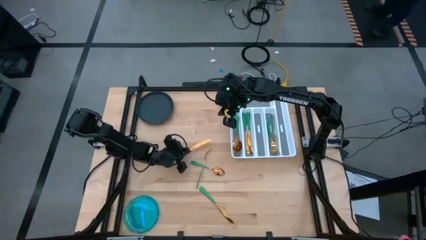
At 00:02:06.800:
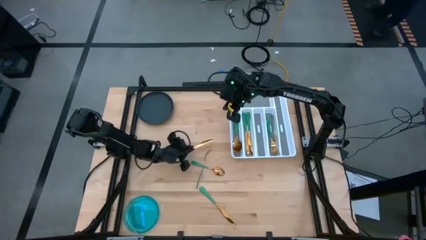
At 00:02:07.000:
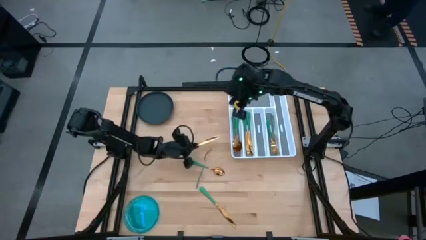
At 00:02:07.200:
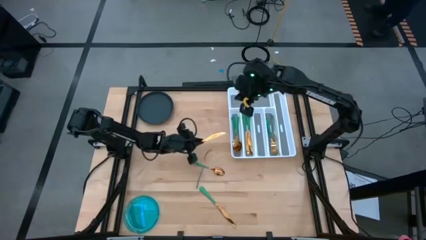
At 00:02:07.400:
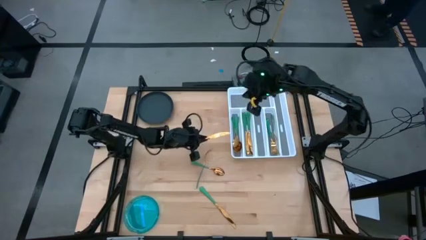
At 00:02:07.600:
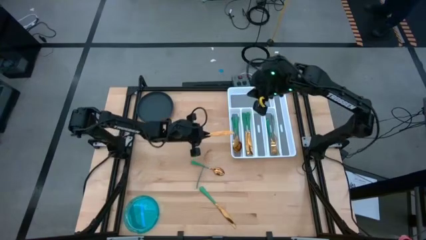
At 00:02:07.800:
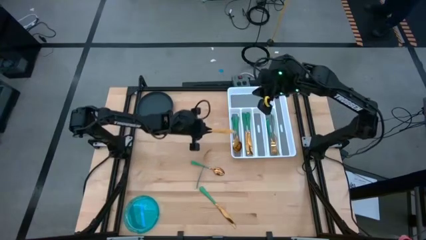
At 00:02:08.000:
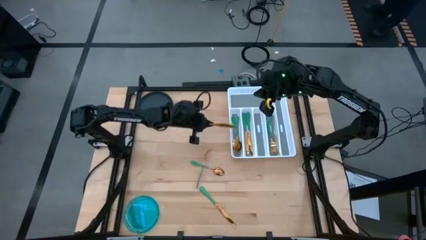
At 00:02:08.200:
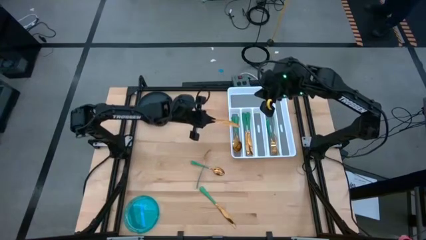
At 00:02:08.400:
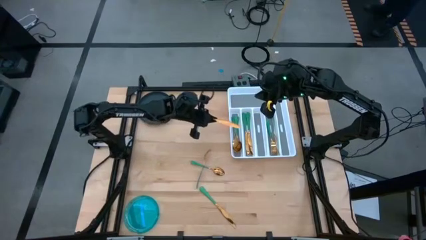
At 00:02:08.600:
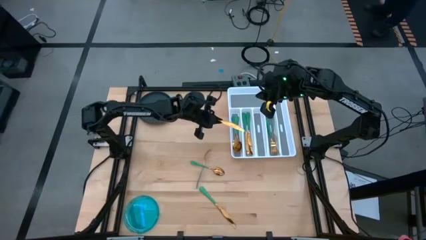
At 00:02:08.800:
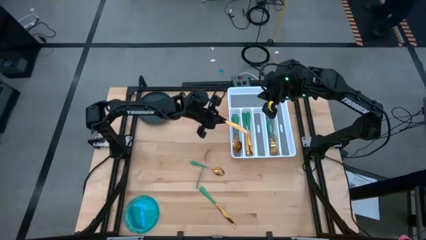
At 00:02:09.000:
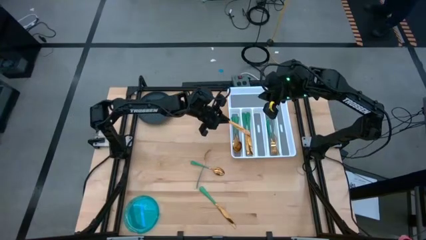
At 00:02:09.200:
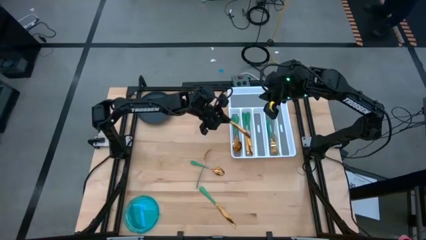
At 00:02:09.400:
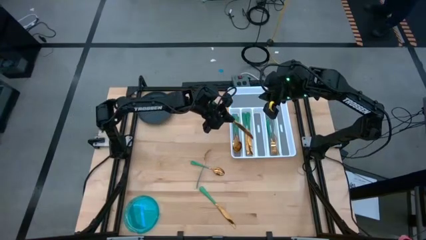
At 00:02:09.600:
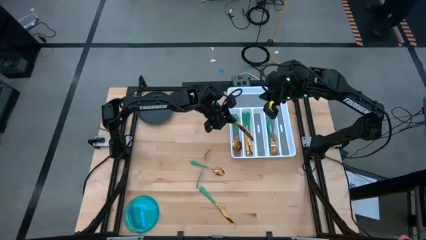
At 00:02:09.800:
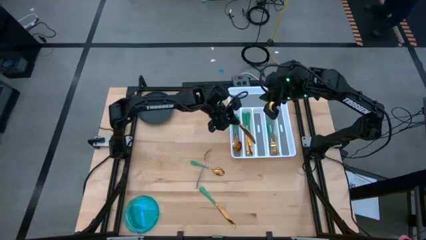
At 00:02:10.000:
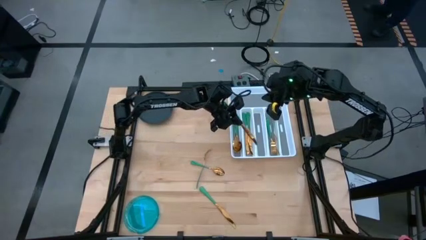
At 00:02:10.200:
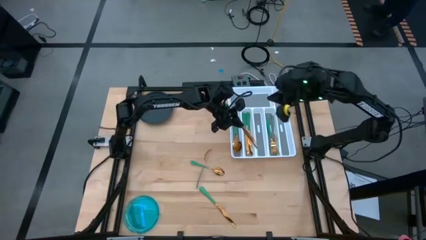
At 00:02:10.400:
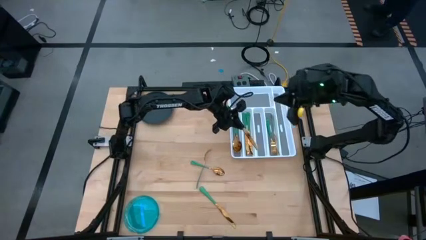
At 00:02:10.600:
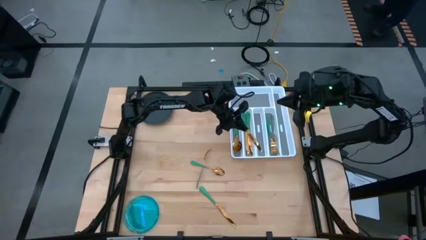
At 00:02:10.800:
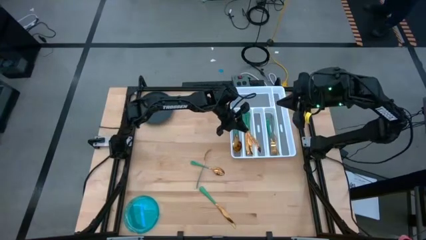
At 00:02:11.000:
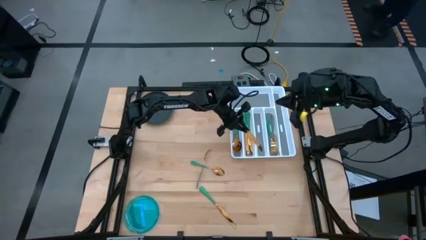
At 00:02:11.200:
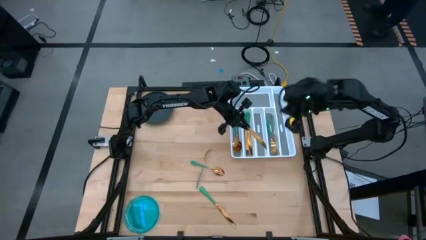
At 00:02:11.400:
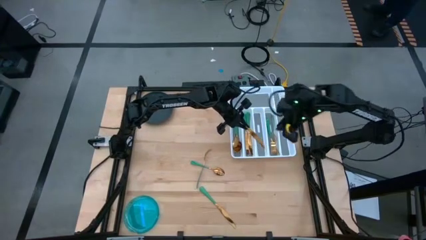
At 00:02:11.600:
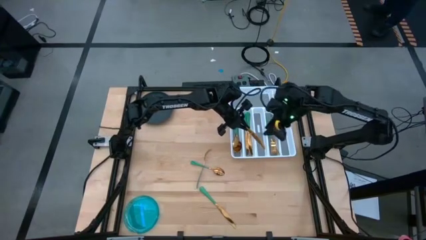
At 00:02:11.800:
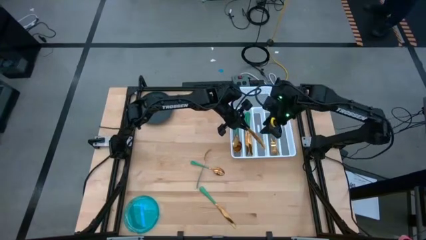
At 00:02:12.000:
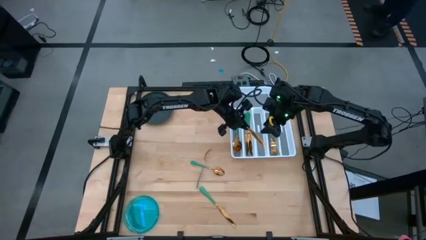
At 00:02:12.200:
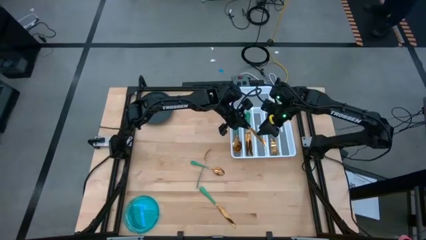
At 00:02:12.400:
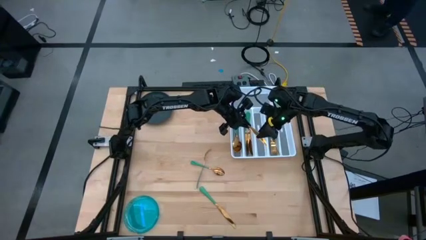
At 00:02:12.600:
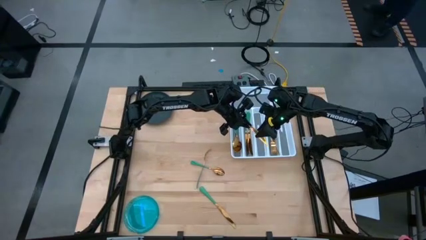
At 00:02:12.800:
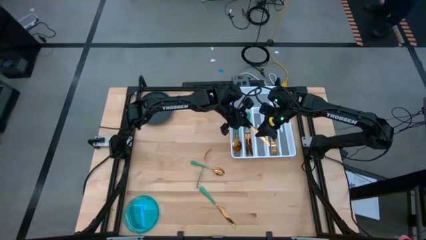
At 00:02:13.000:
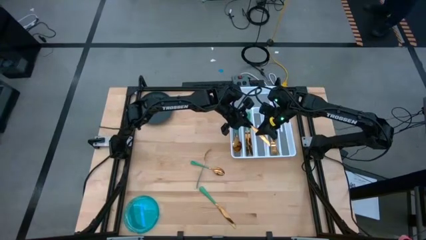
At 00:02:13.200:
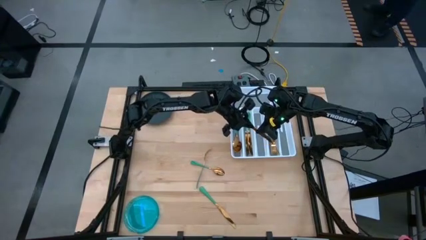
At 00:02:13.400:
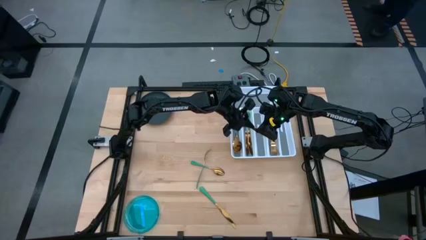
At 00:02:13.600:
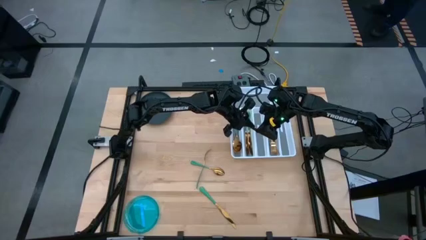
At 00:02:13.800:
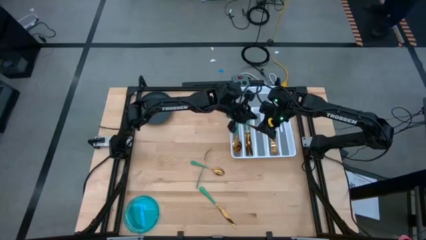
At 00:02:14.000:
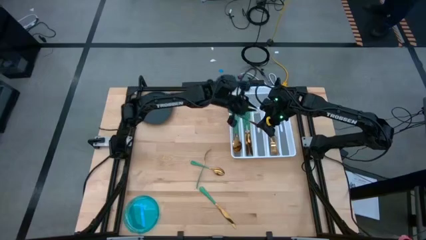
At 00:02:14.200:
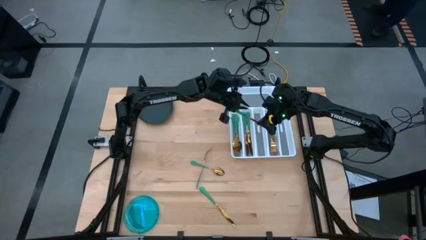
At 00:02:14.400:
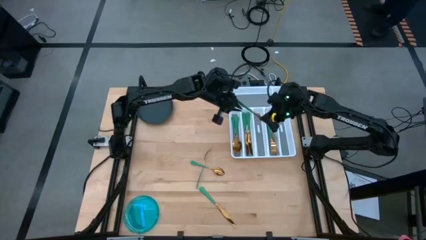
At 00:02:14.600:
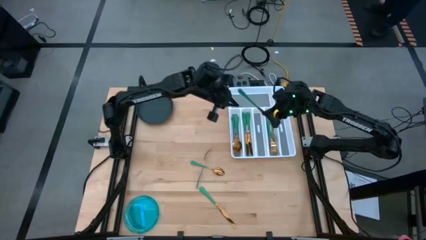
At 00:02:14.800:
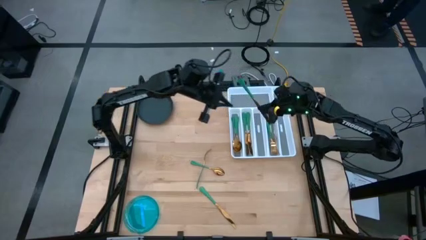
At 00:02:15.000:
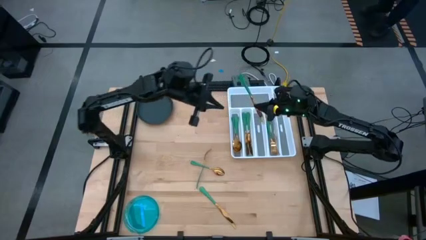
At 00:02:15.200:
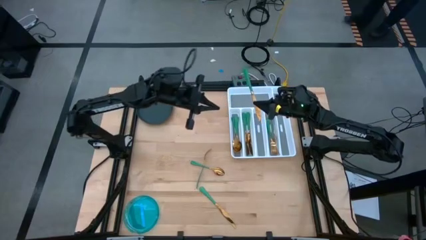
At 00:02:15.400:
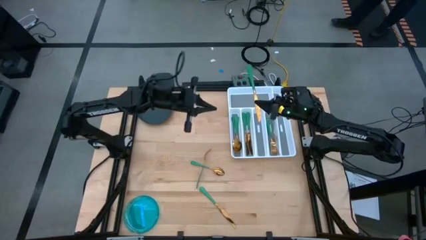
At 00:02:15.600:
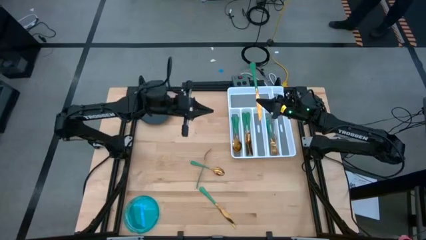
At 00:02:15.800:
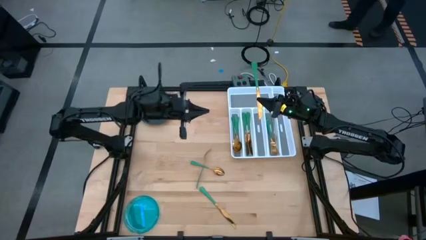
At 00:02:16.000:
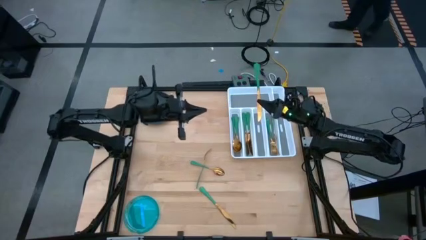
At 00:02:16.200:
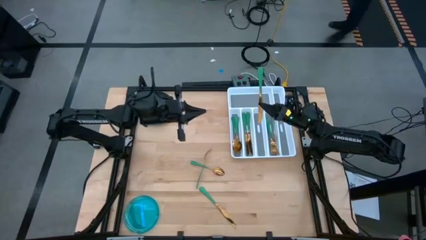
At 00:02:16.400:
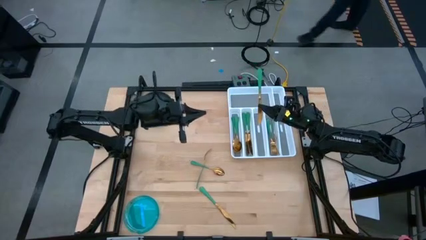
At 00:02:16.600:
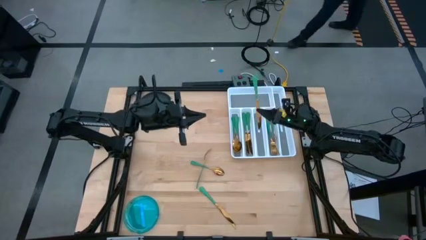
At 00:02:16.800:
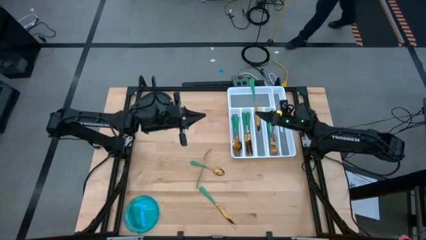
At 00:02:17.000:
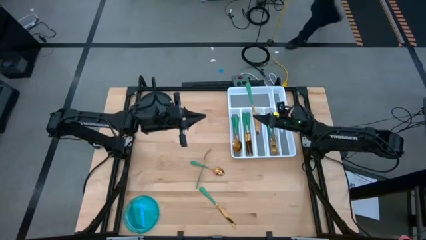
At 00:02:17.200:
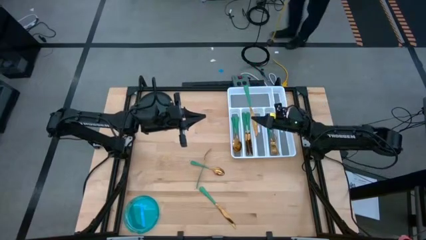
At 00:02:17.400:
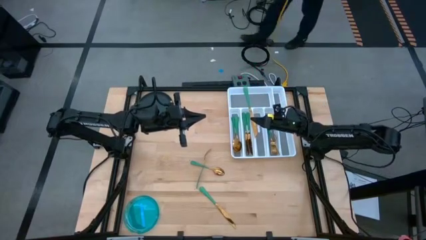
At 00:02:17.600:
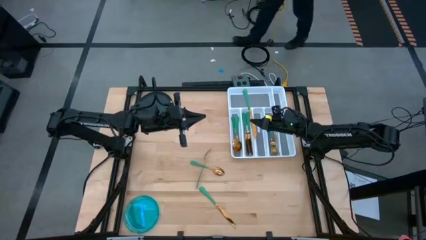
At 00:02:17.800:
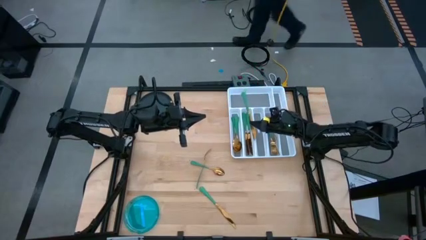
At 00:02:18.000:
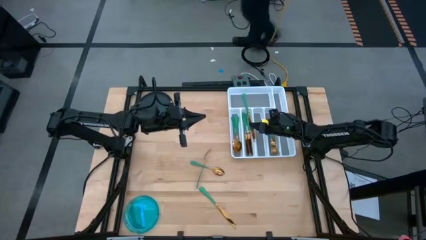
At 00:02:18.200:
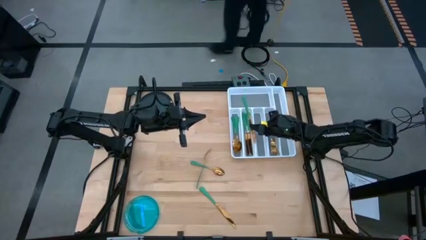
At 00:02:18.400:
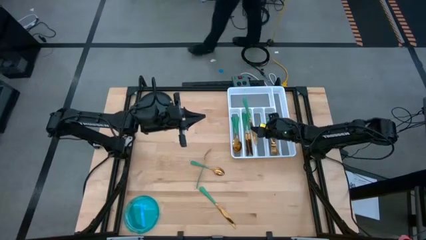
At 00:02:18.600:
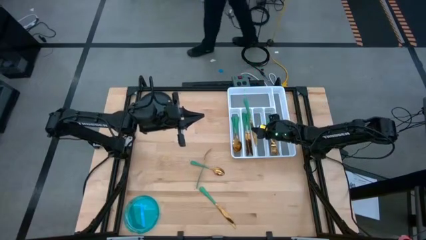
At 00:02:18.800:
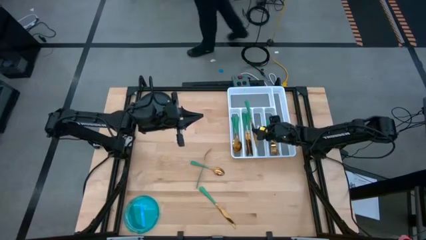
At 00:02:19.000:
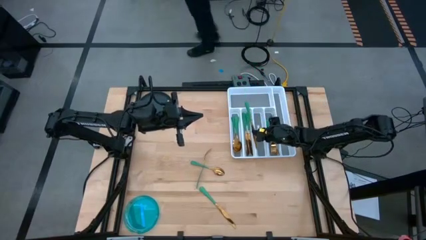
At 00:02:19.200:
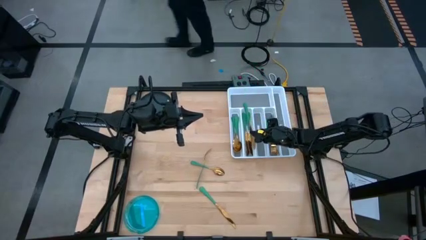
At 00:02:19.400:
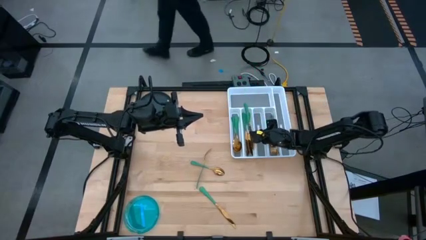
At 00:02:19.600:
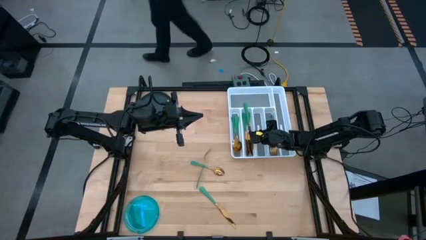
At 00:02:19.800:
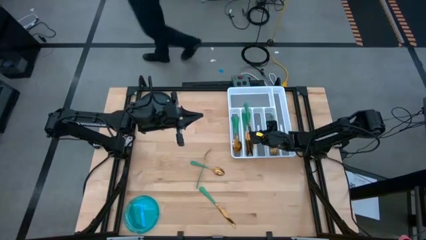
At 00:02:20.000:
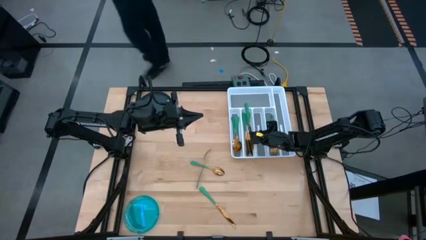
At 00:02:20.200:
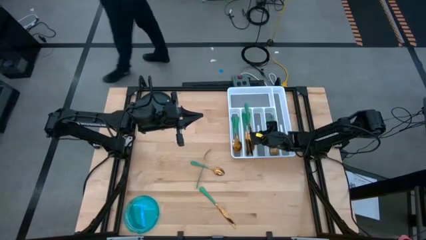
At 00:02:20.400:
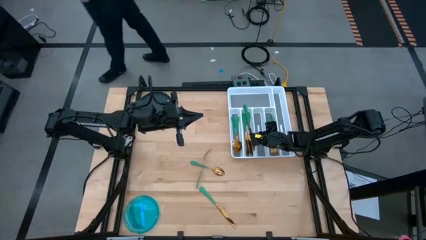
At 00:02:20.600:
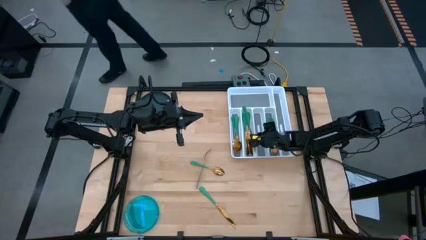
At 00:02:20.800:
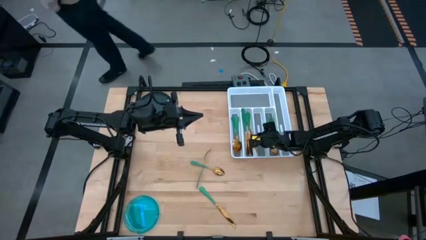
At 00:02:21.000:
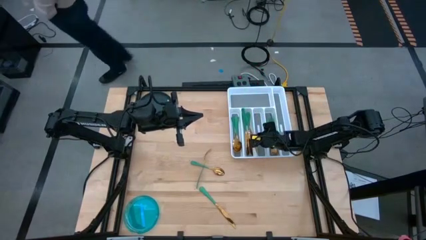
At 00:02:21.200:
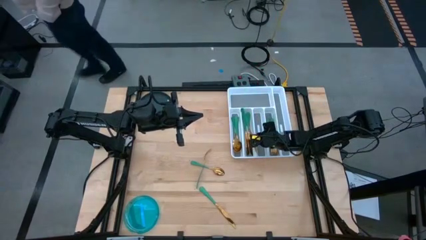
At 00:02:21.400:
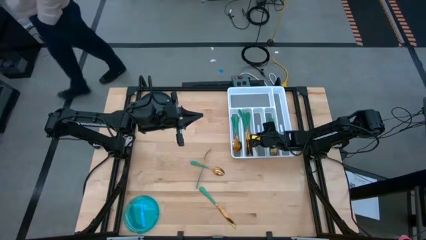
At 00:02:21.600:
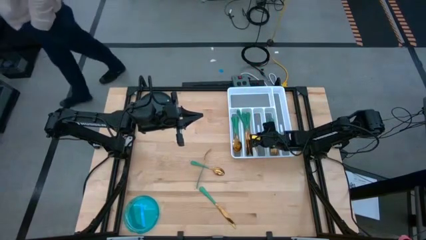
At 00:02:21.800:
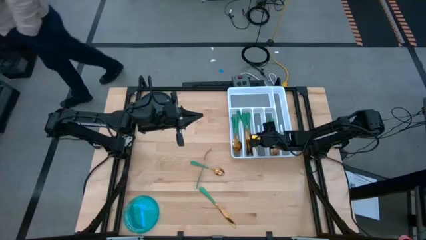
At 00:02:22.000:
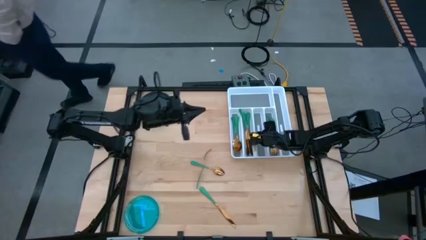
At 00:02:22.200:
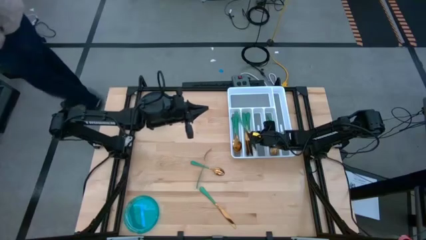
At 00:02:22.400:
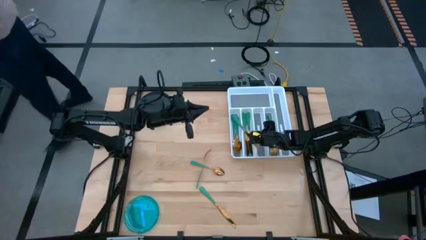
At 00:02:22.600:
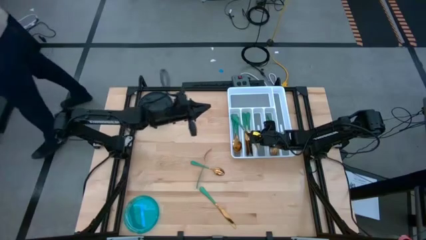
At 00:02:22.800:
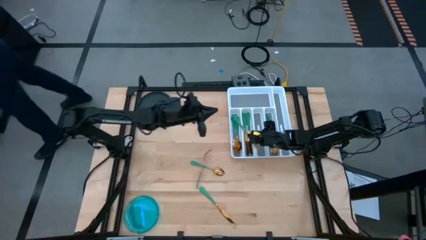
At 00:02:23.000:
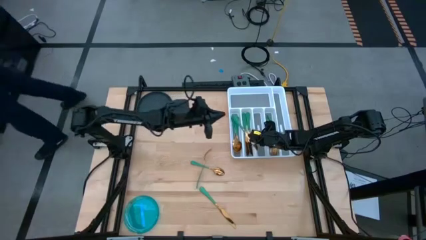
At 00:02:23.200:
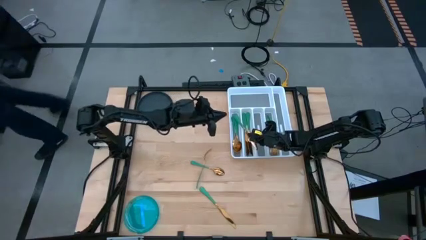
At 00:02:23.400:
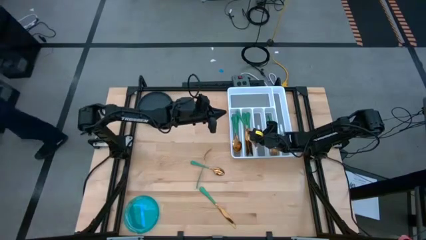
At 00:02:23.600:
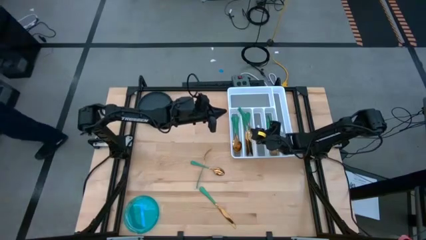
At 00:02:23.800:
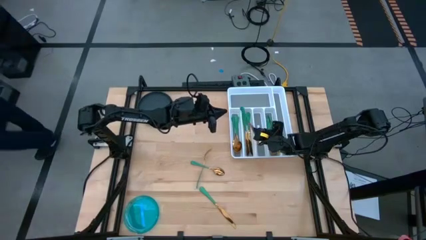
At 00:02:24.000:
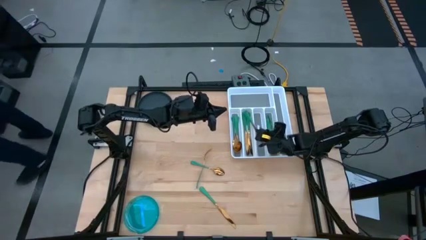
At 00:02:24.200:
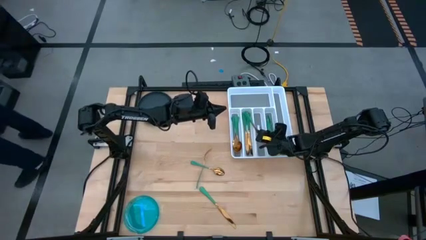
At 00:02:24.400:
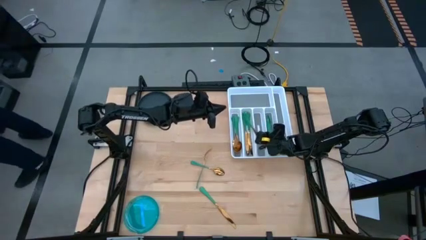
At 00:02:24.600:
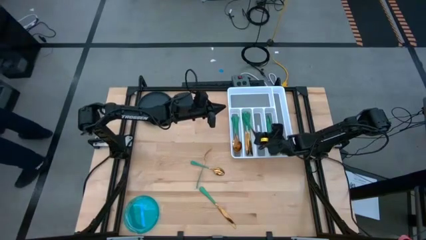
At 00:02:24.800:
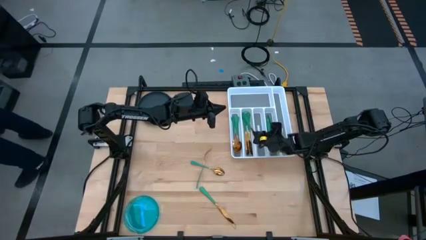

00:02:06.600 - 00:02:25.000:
Task: Sort silverware
Put the top green knife on the silverware tray with the other green knives
